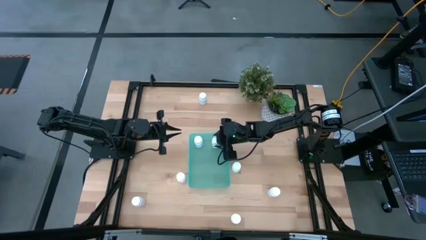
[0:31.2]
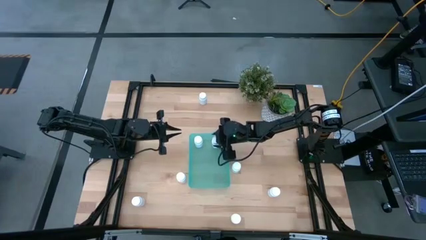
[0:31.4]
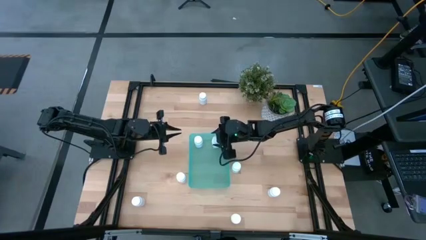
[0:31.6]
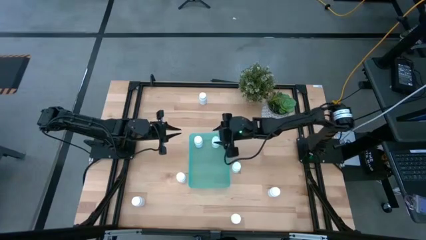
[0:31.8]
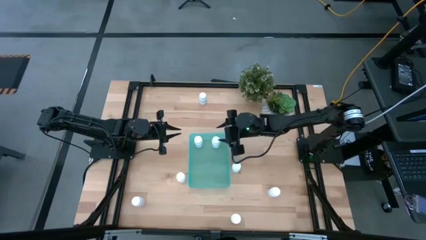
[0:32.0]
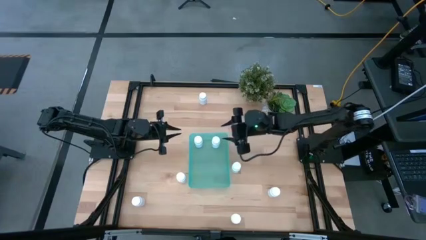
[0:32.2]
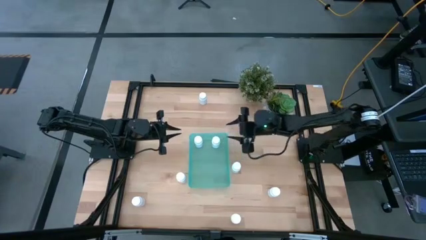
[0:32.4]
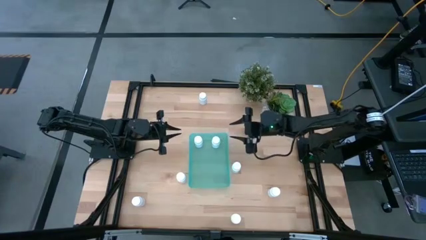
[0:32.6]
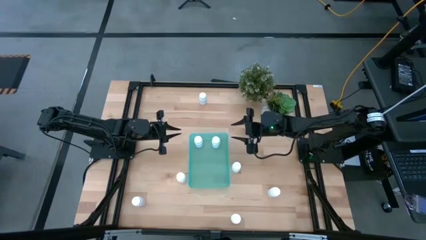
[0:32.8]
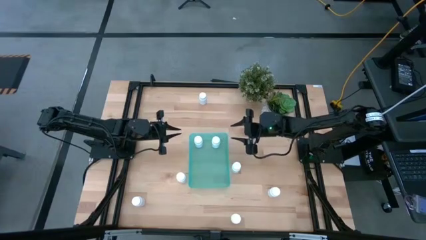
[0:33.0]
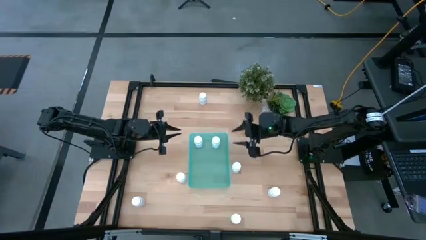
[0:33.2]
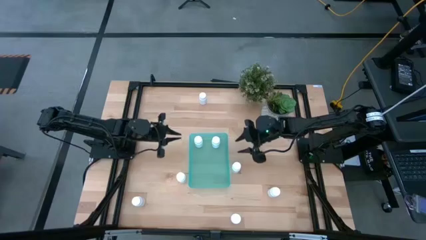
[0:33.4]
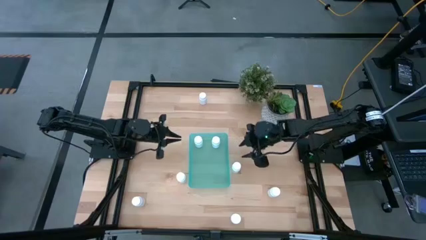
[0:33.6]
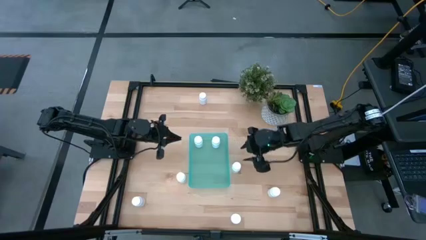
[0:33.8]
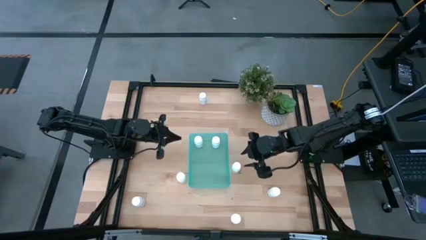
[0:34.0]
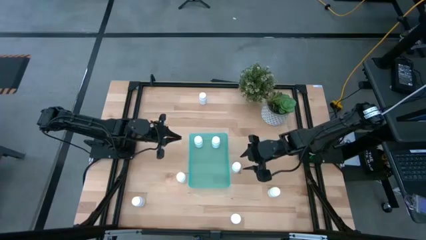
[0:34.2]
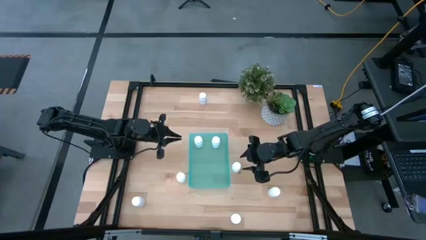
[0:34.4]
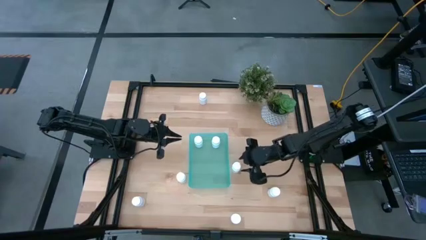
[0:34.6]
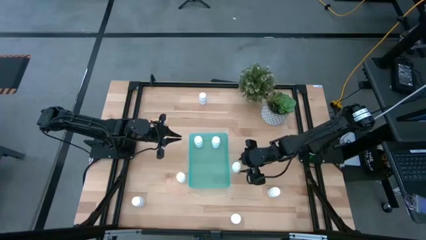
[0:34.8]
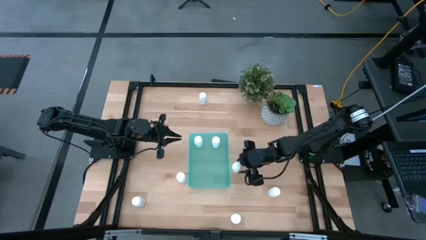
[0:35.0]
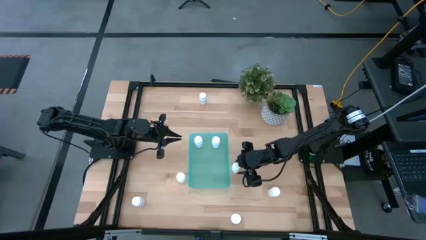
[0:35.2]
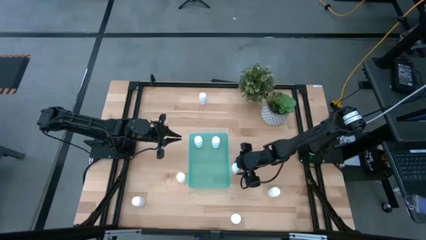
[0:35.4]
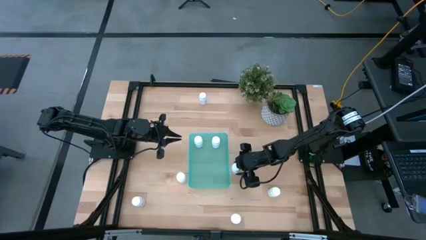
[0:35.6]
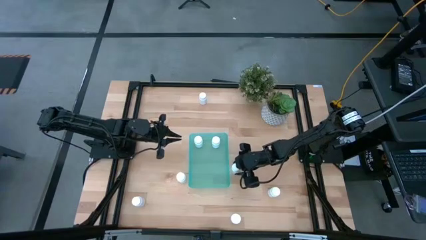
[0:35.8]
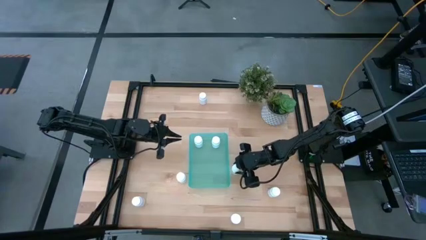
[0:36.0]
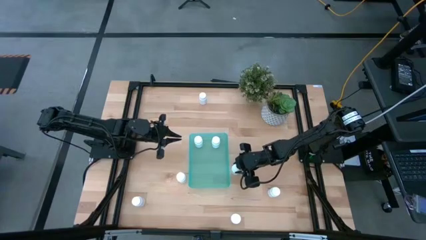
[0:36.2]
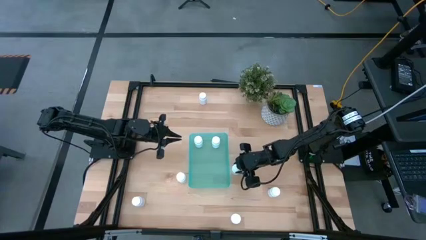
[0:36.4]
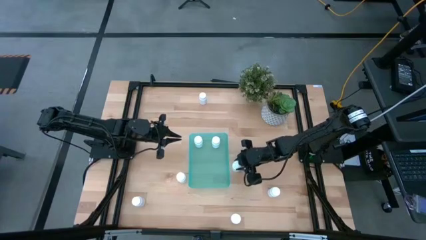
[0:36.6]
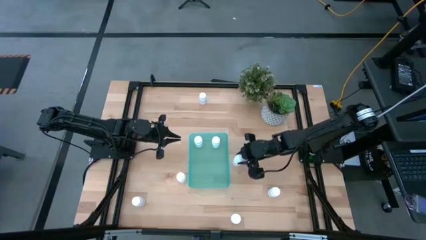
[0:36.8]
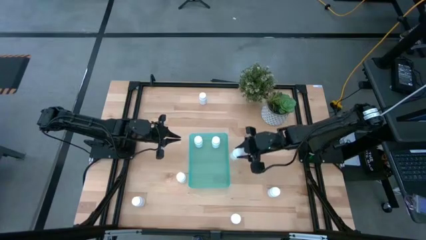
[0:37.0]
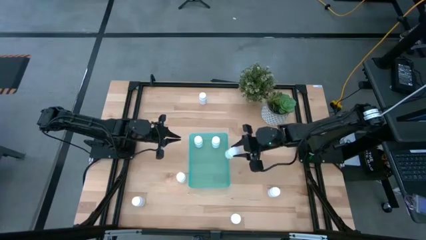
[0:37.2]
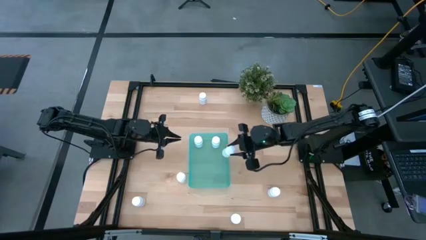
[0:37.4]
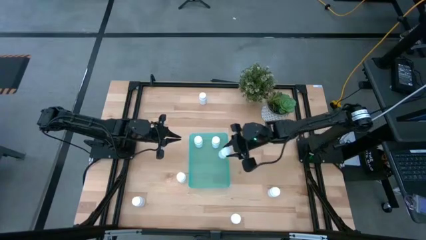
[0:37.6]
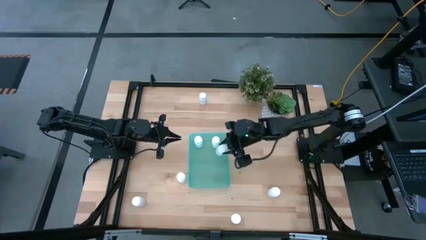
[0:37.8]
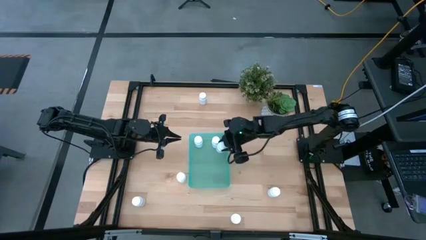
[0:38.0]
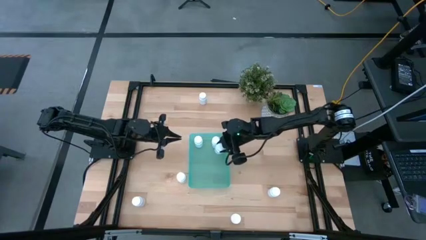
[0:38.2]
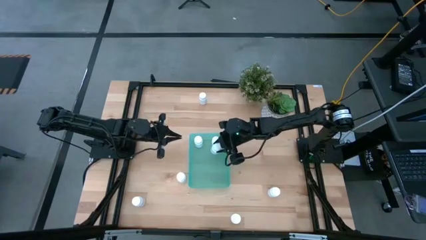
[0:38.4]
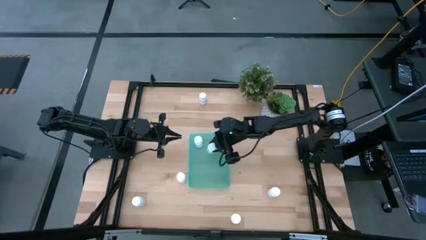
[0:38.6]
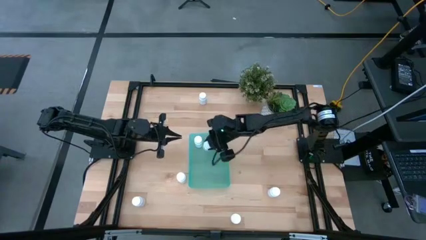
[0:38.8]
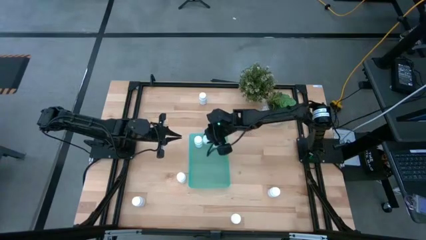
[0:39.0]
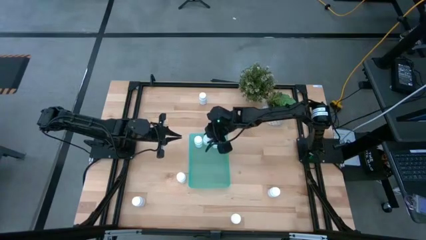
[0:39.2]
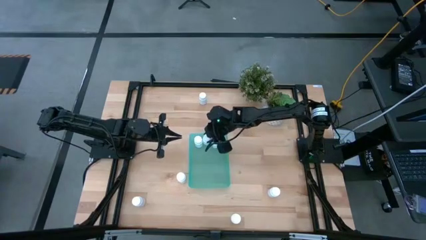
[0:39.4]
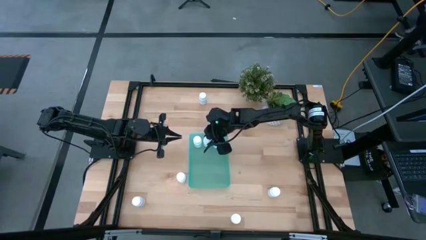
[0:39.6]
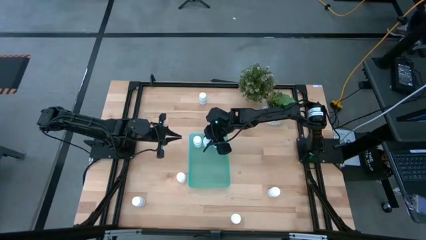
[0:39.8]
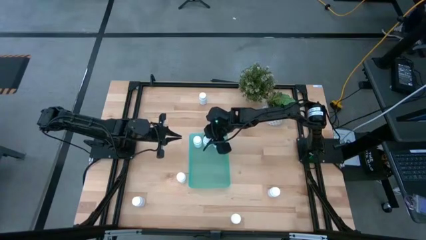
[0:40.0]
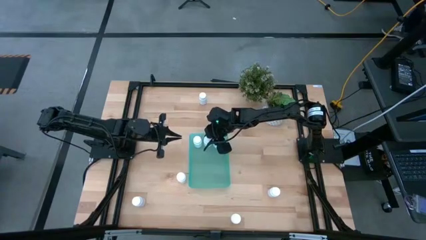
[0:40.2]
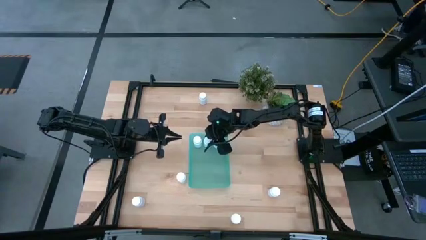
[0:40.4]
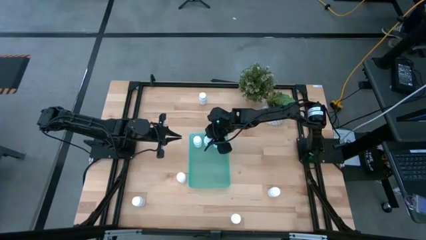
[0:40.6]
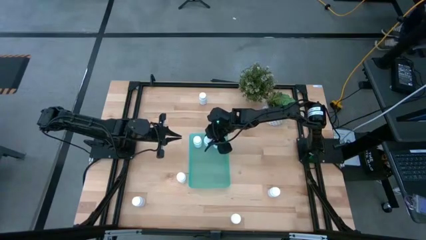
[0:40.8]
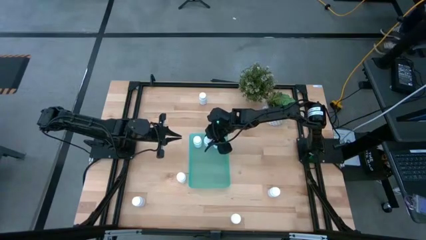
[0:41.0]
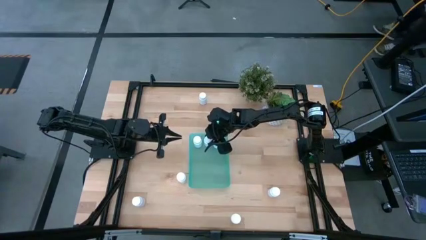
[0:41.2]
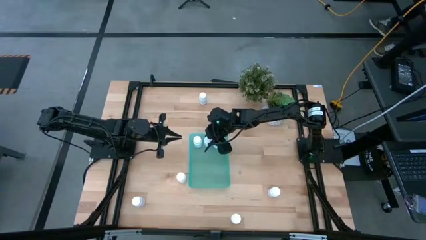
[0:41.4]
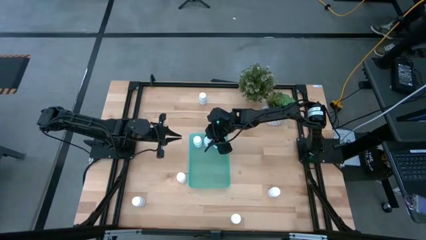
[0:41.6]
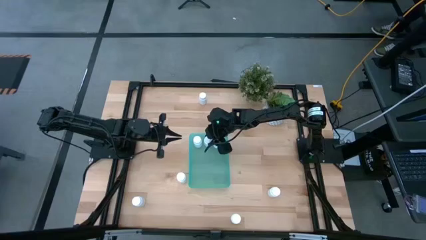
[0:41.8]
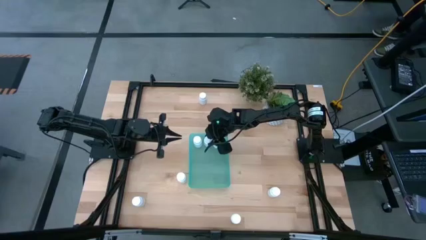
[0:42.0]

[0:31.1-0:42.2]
Task: Pick and place pill bottles into a basket
Put the white pill bottle into the green bin

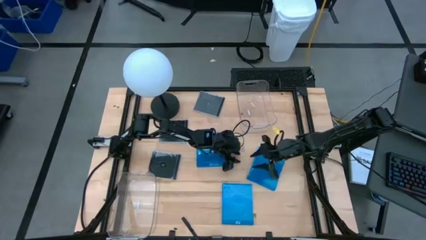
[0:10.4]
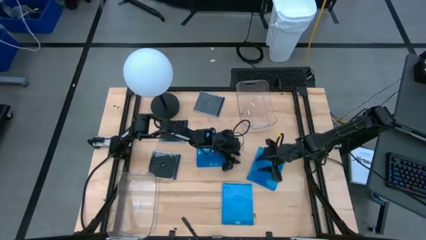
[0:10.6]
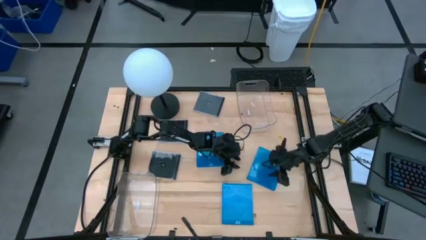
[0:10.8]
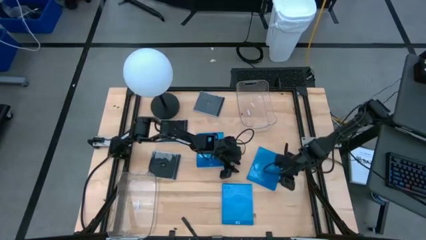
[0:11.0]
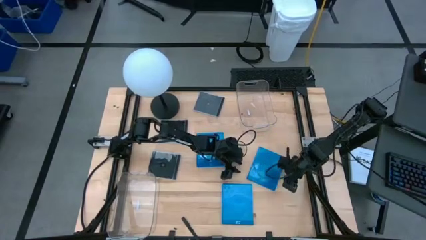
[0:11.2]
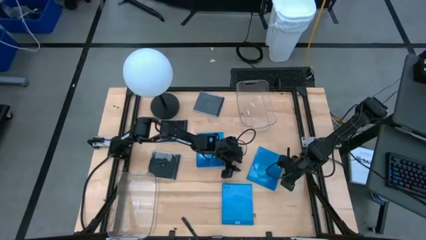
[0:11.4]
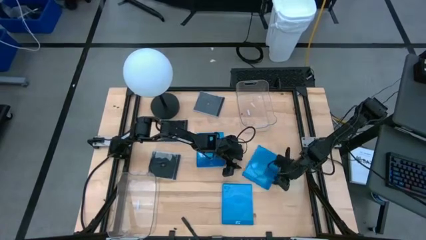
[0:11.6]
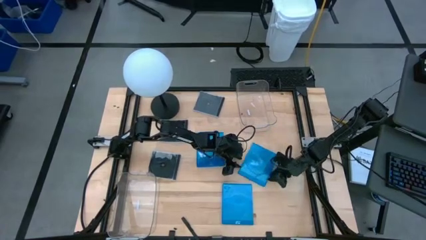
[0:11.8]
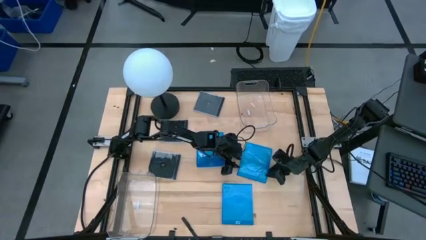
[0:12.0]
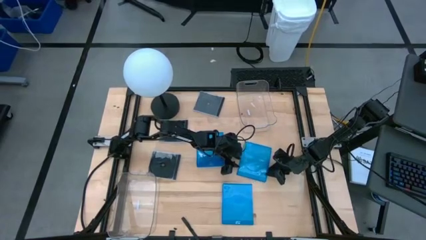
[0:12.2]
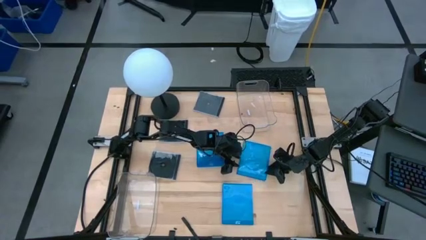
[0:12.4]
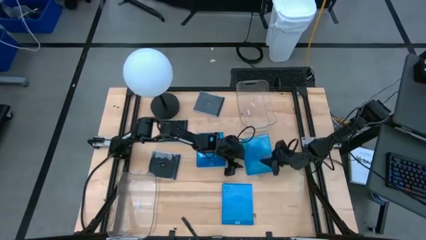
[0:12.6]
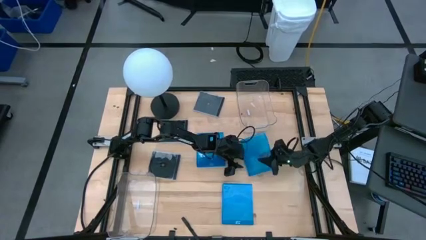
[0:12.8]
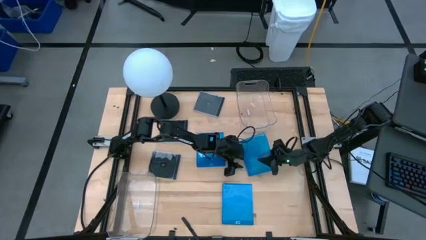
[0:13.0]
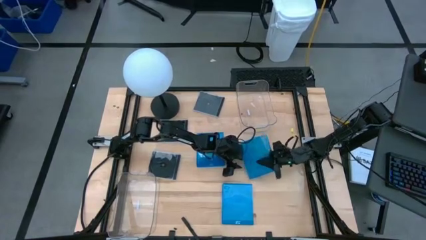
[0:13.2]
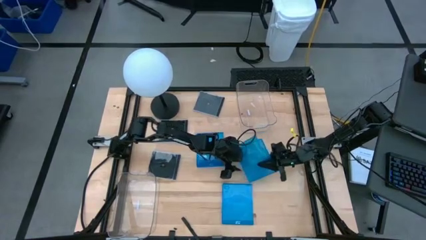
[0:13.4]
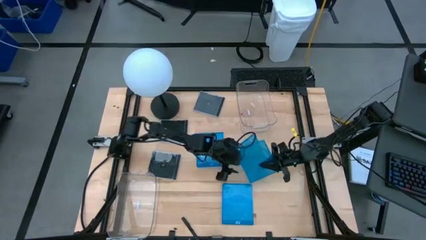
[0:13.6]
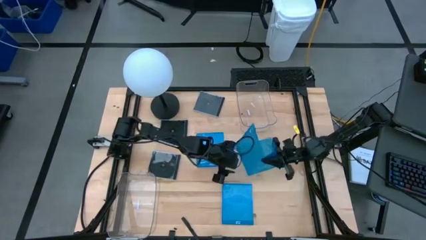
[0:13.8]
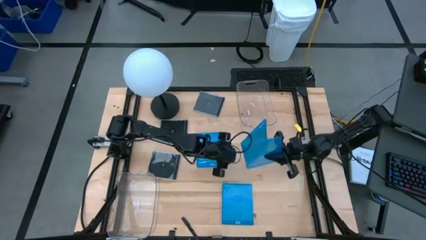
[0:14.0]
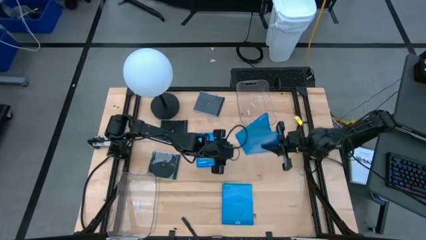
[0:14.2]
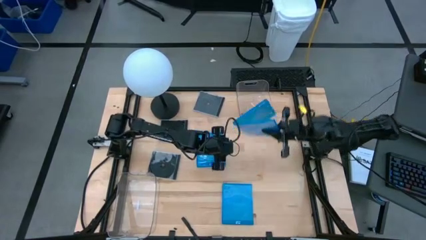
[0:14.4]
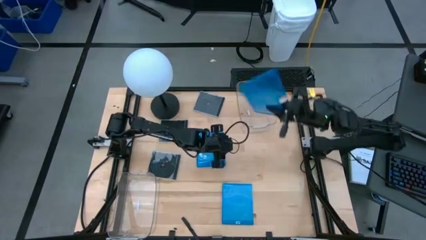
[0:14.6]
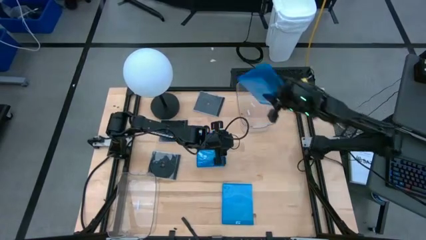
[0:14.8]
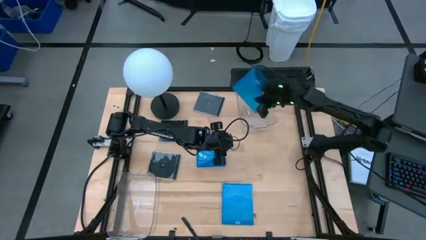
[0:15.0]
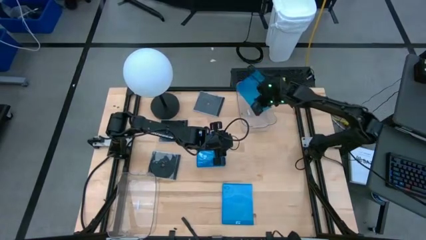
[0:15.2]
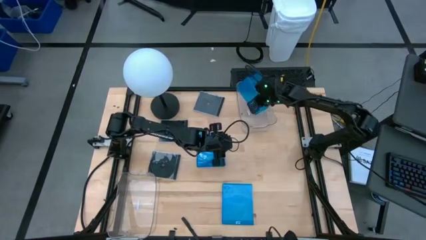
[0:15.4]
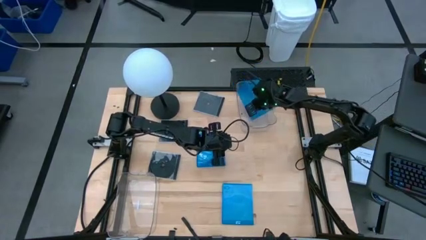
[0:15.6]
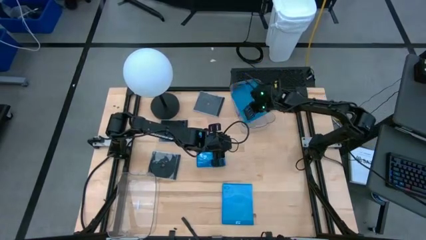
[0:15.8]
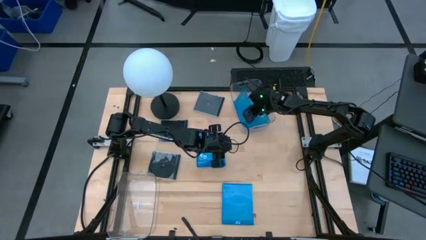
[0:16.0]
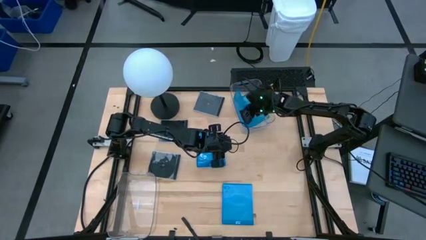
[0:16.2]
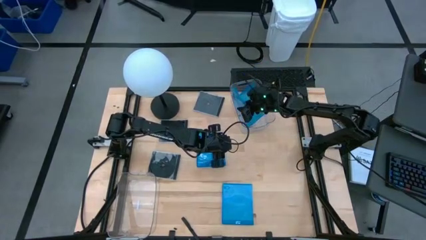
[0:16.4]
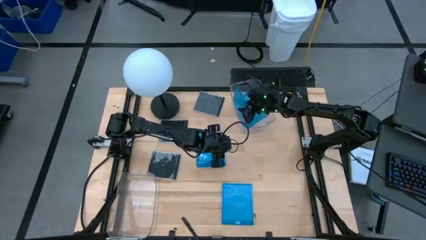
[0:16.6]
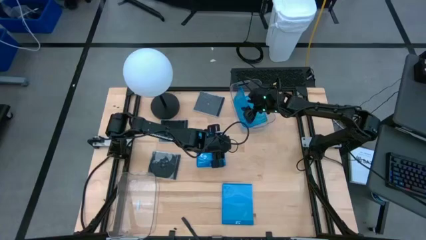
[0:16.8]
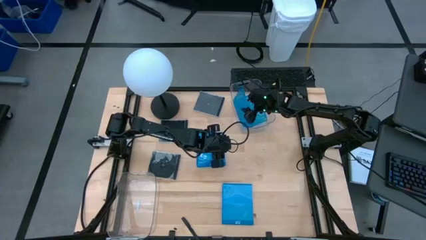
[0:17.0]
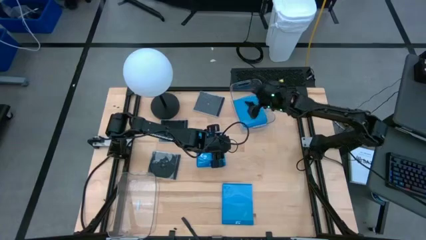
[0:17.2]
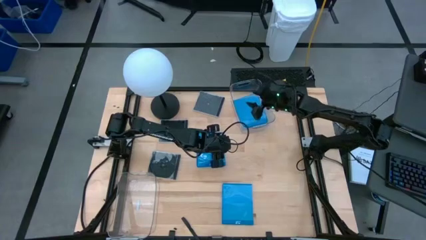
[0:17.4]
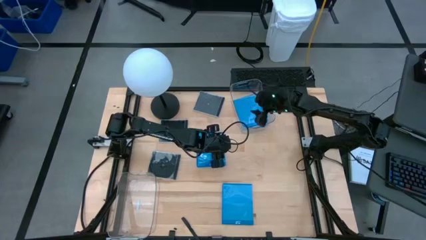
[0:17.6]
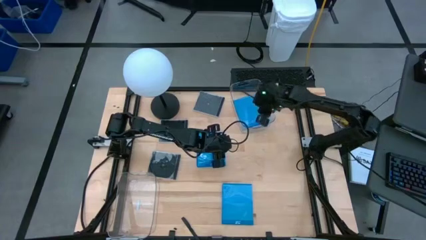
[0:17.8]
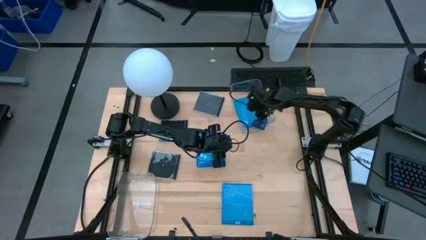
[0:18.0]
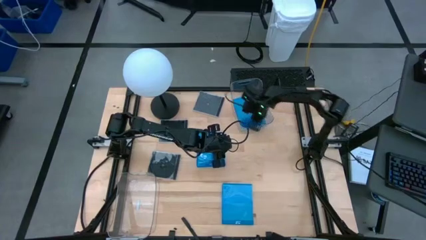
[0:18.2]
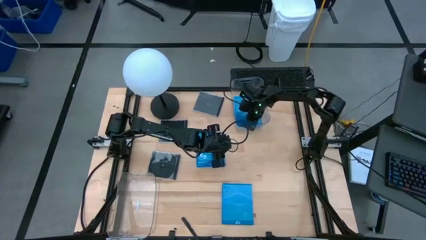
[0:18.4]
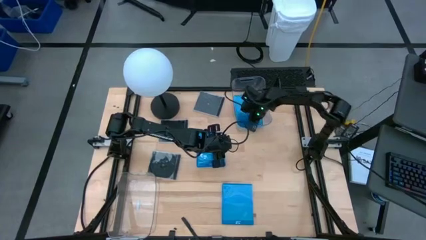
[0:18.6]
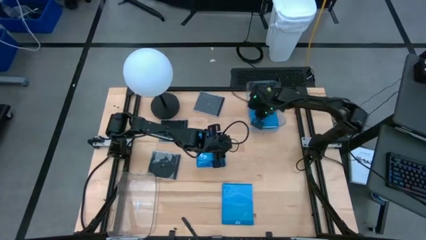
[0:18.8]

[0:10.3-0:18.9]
Task: Pick & place jewel cases by type
Put the top right blue CD case into the top transparent bin
